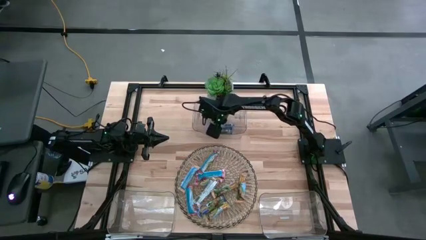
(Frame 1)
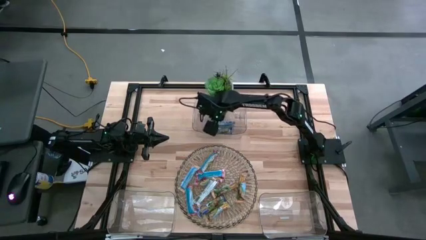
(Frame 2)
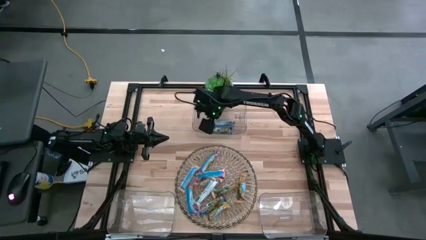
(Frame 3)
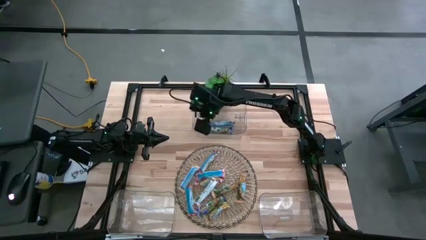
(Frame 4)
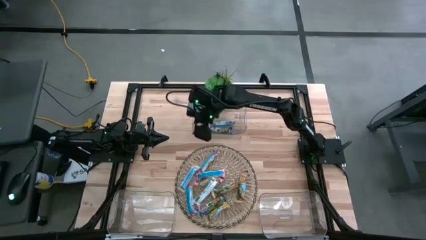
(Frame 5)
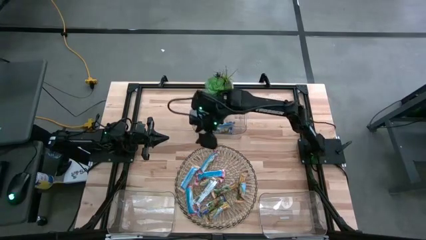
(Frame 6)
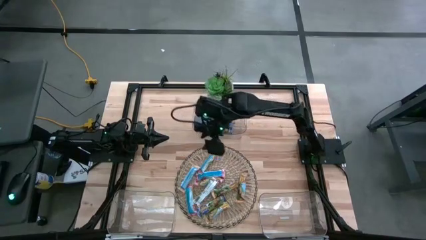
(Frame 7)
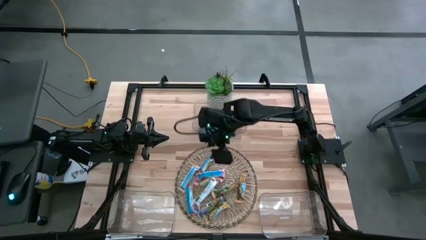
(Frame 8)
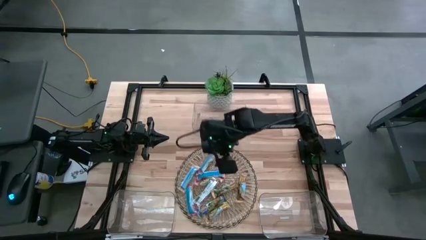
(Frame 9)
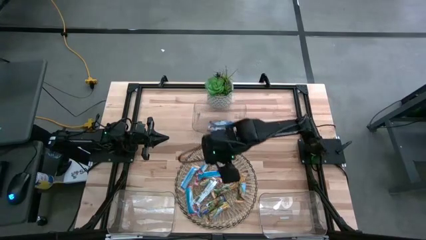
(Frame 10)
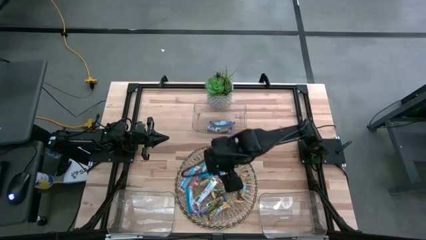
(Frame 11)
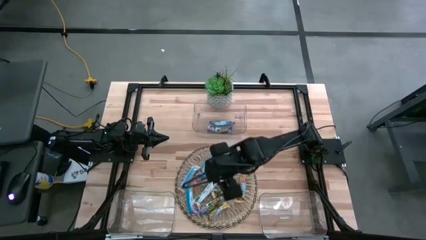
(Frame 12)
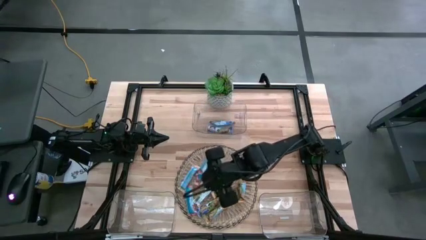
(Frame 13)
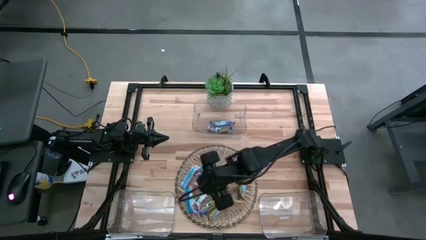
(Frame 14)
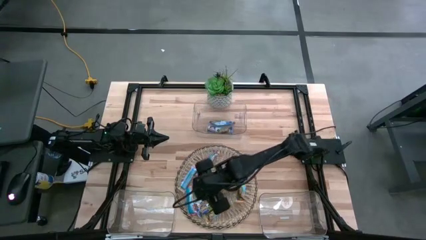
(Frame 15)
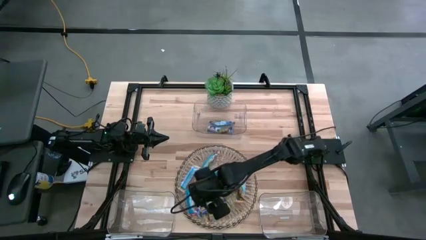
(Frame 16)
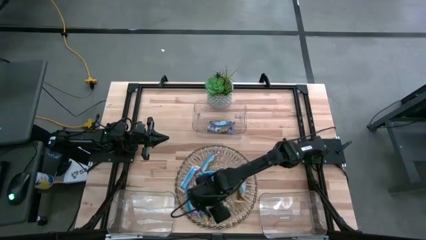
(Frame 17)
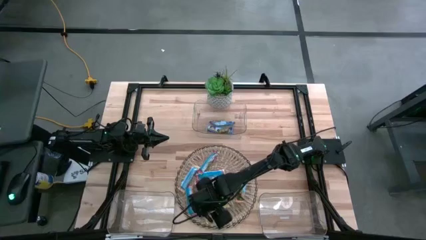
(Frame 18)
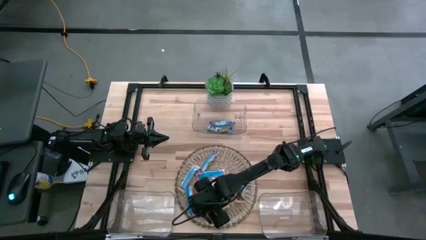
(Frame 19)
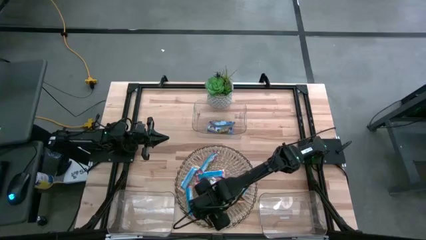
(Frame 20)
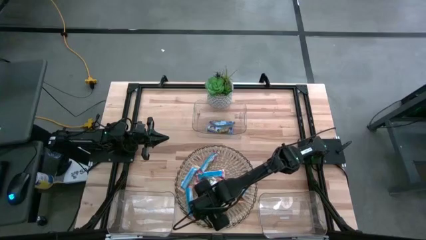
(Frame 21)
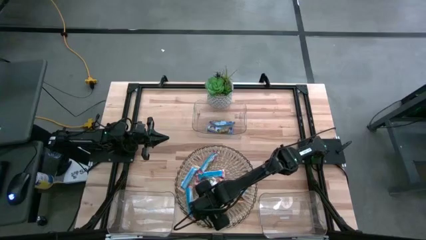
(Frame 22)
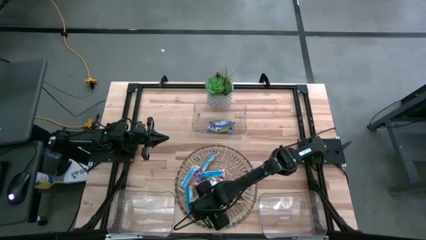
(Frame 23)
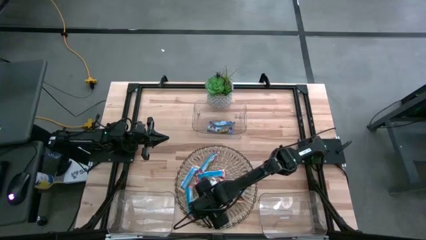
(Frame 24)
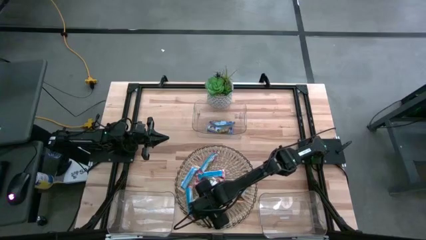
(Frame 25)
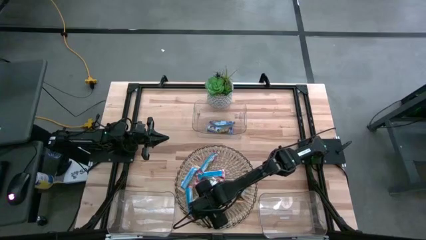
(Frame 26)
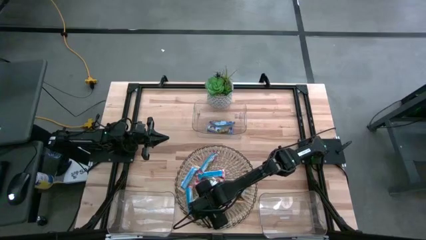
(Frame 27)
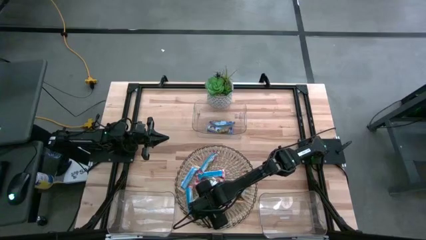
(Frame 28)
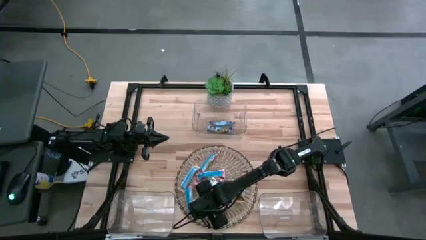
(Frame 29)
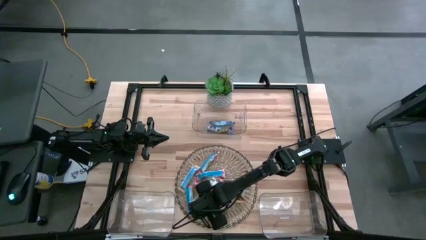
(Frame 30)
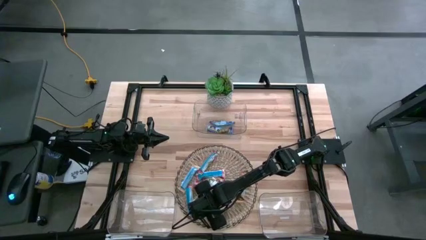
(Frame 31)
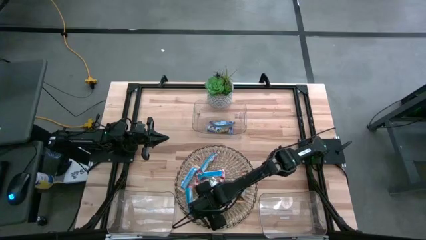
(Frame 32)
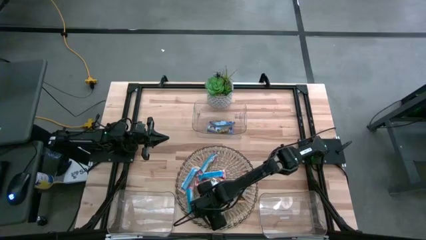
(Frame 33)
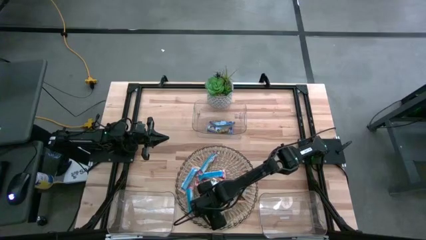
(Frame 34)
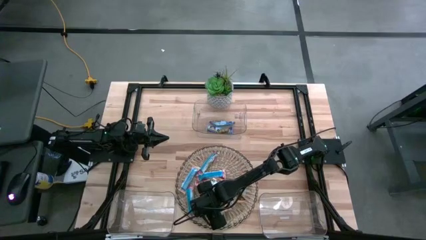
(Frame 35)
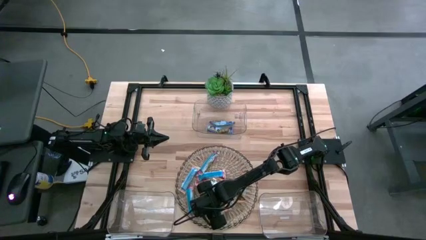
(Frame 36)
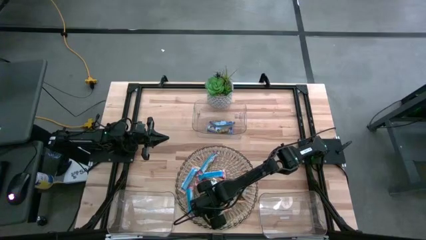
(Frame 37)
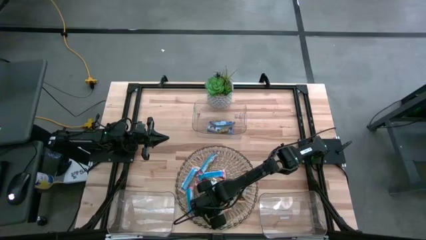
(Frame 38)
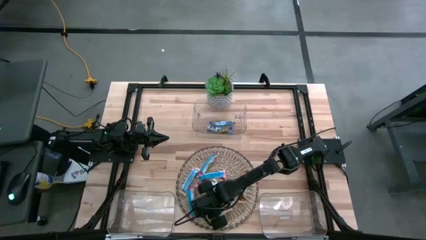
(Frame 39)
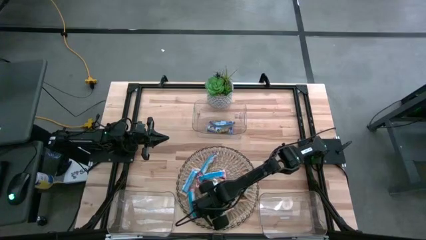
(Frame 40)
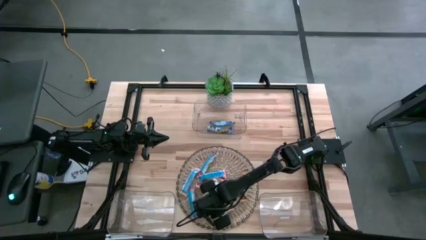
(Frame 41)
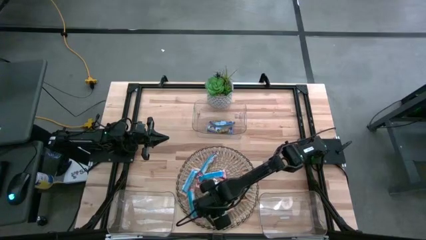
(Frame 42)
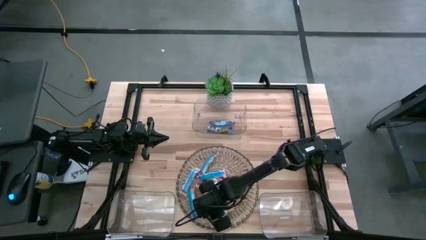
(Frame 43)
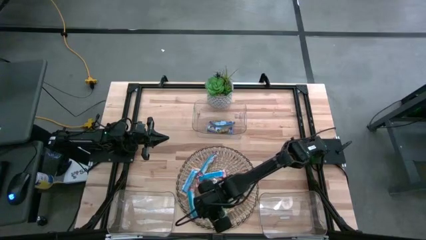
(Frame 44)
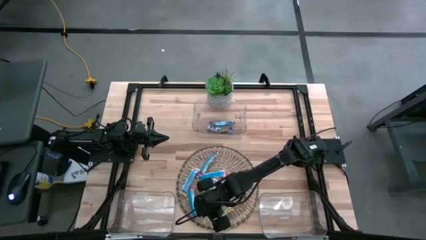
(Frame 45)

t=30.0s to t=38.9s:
Task: Pick and place Granola Bars by type
Put the blue granola bar into the top transparent bin

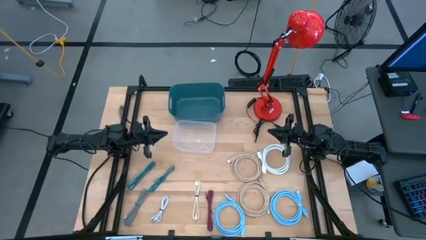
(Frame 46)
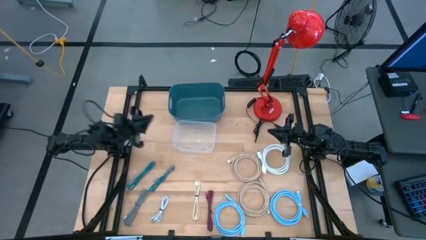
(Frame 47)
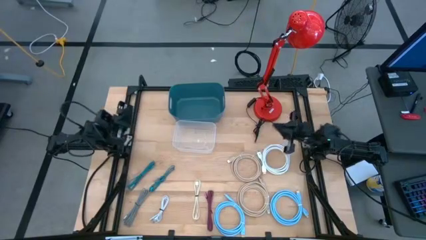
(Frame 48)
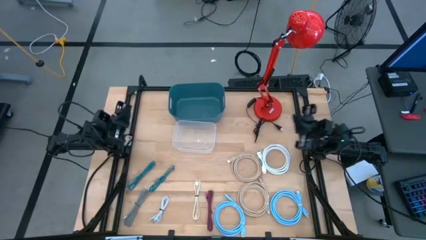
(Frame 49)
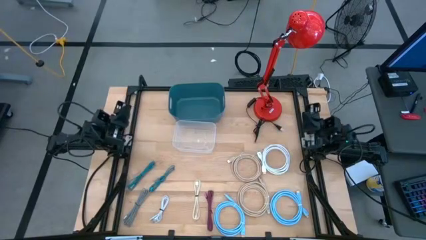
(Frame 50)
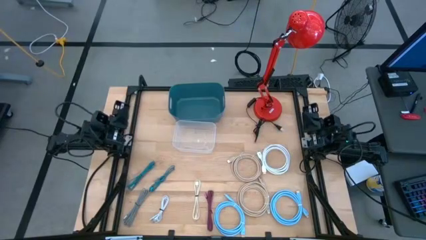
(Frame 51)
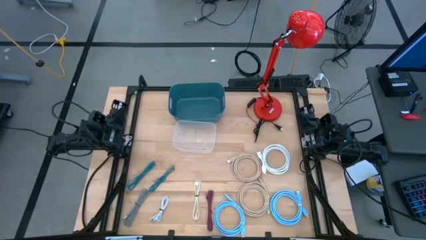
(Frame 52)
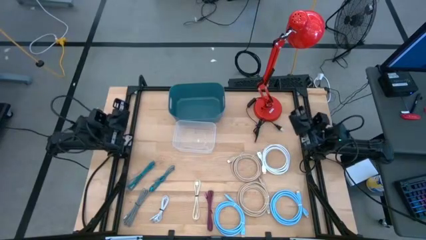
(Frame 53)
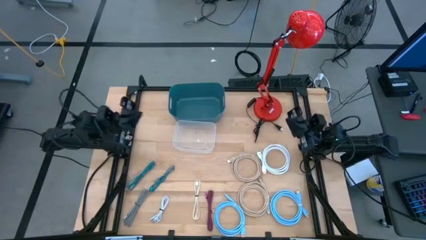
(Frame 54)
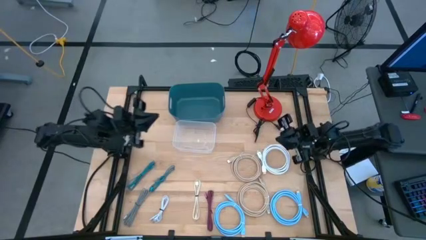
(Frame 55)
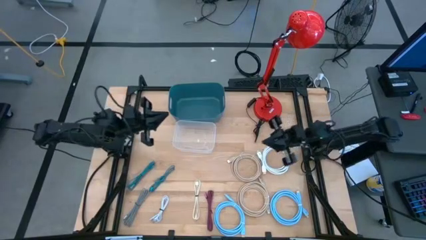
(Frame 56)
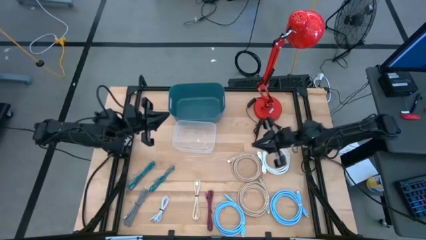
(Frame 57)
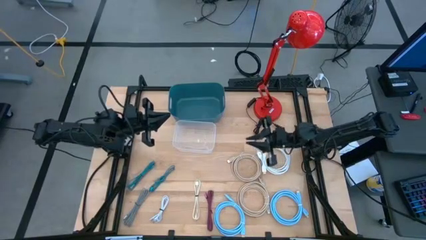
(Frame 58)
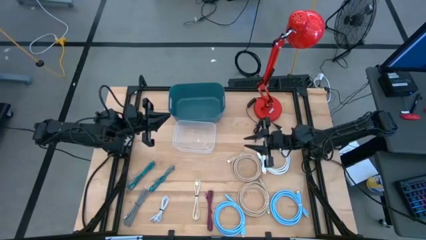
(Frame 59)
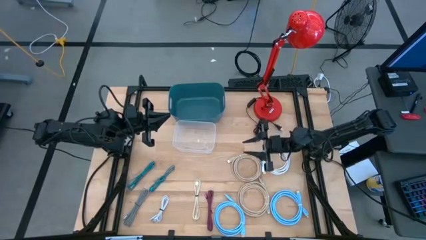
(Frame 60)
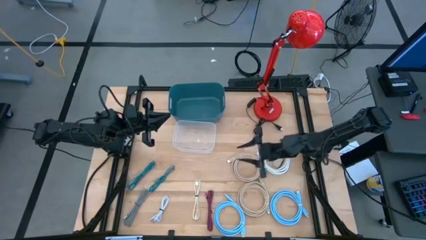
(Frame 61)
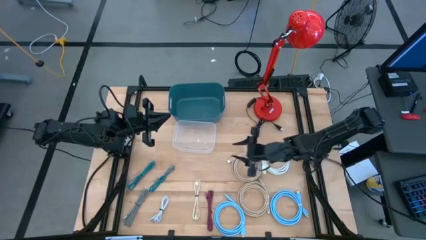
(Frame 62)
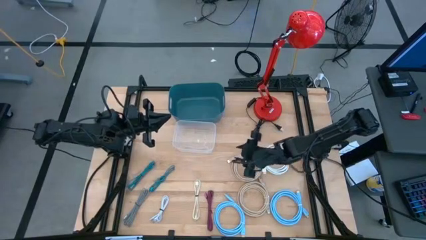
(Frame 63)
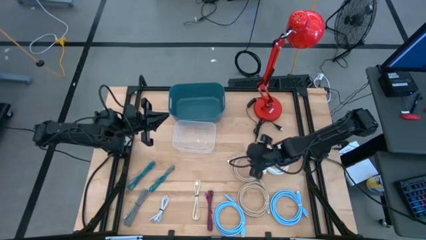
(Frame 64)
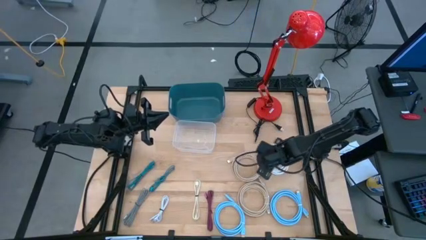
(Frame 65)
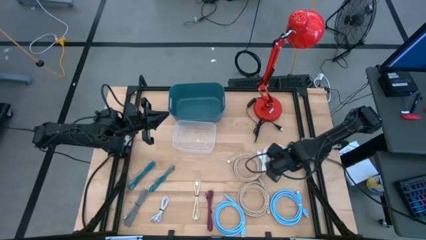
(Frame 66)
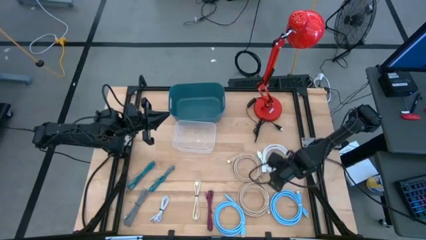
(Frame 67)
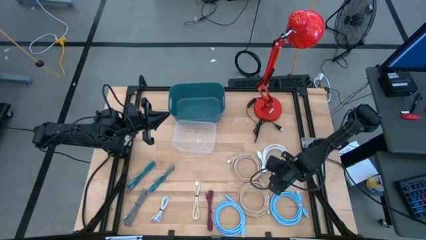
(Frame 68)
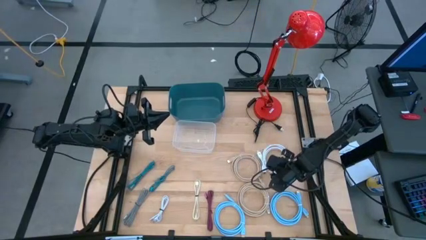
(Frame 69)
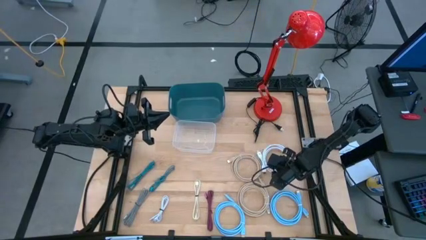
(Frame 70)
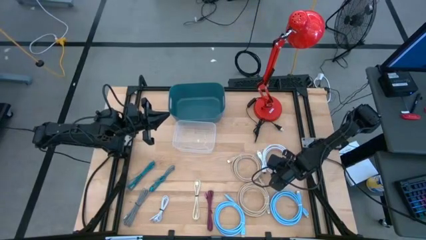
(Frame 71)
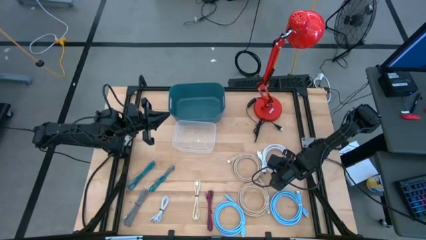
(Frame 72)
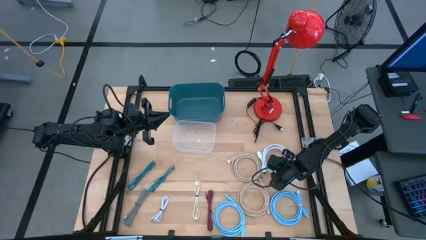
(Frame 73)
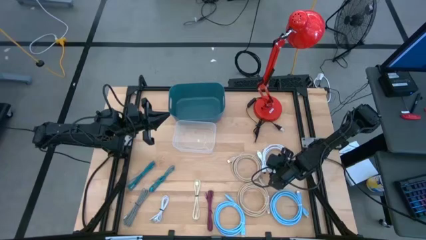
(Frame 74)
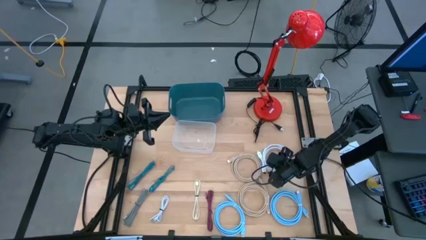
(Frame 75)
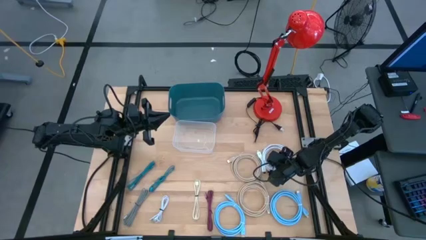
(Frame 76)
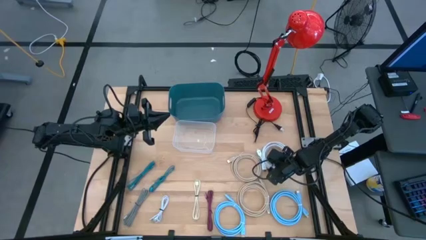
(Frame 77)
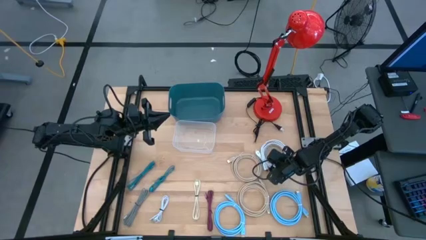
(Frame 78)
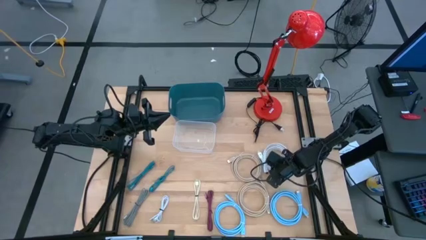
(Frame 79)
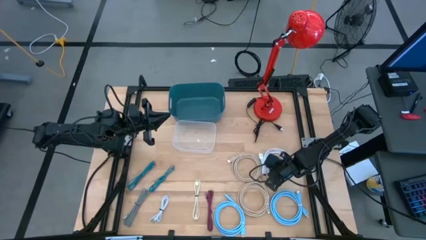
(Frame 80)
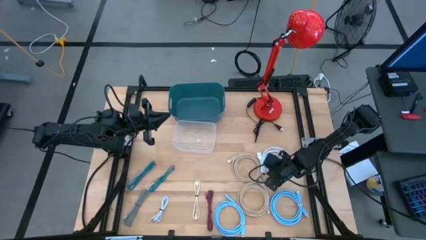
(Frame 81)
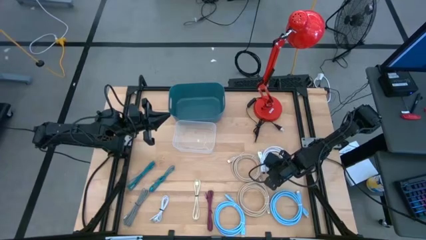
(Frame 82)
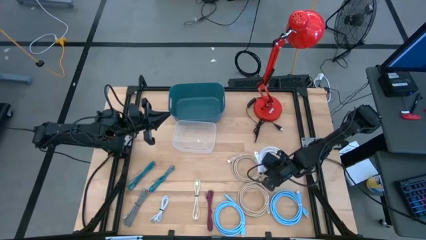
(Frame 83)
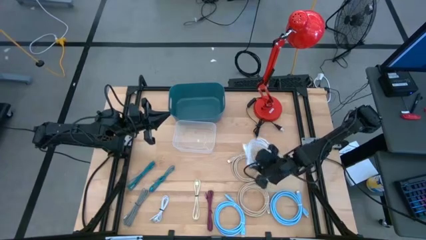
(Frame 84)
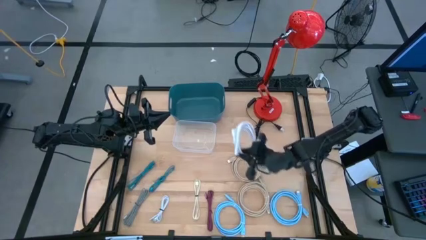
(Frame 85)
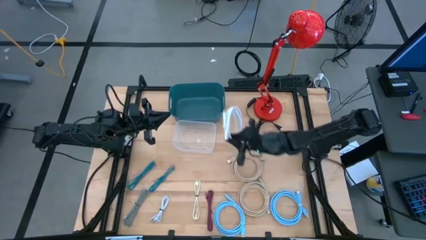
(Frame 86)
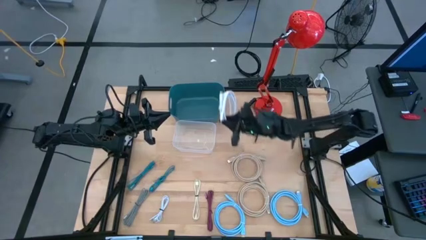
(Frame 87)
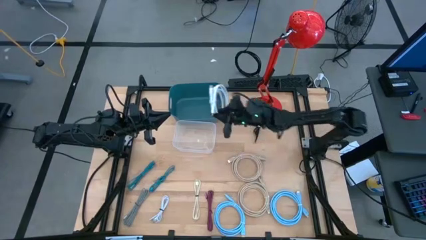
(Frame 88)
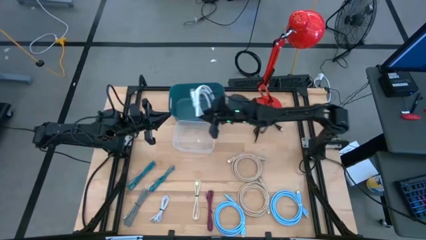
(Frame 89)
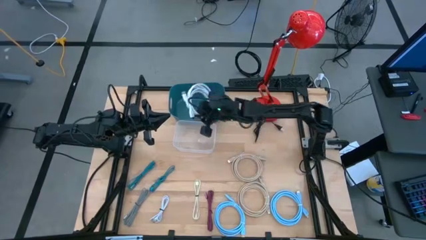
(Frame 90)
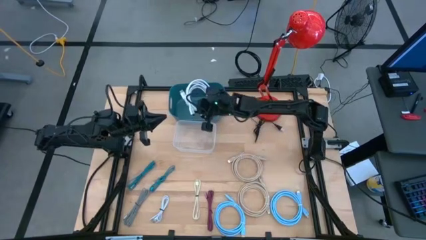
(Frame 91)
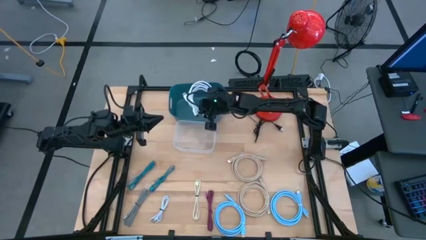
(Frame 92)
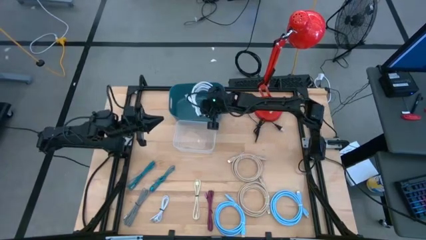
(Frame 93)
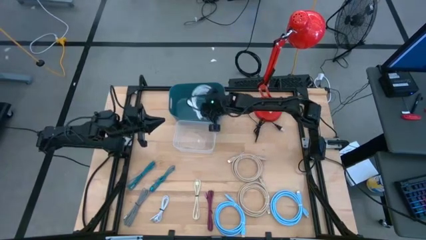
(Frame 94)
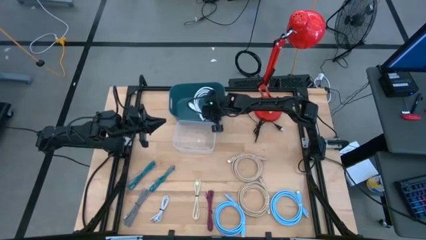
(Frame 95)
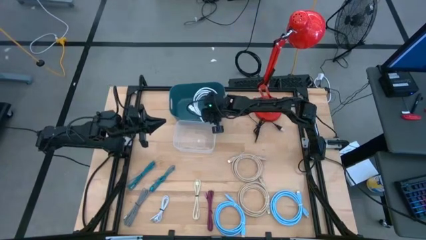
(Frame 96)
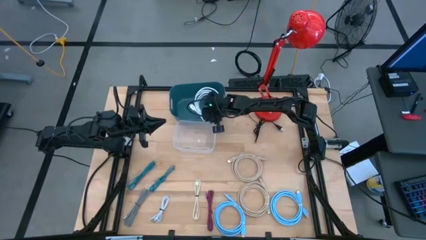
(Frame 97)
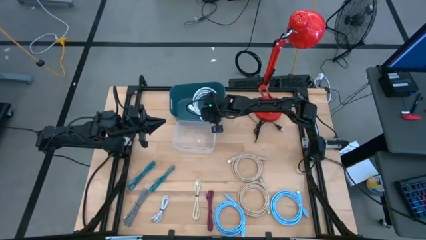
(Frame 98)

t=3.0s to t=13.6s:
Task: Pick & Place USB Port
Put the white USB cable into the dark blue bin
